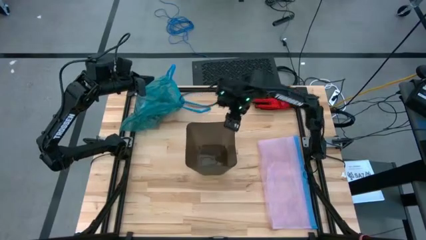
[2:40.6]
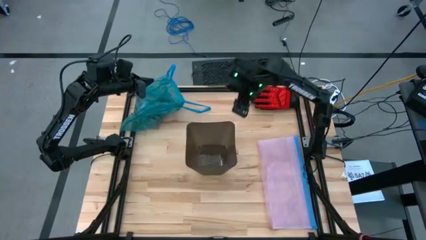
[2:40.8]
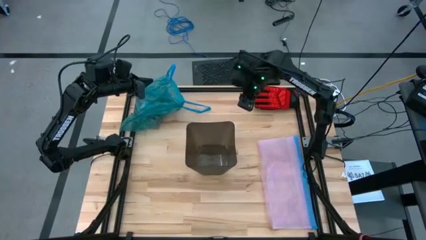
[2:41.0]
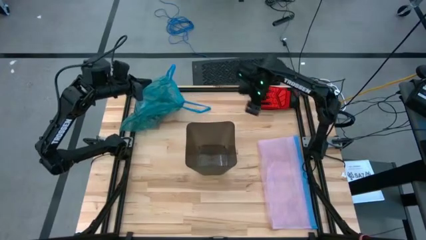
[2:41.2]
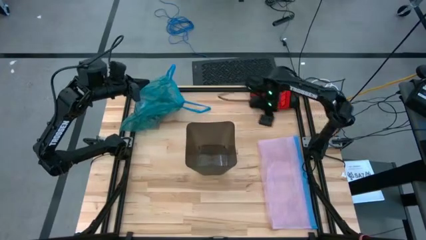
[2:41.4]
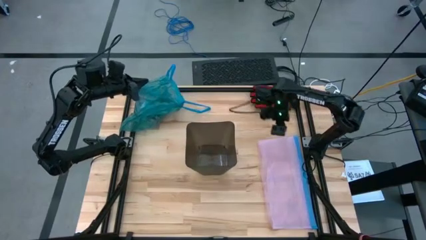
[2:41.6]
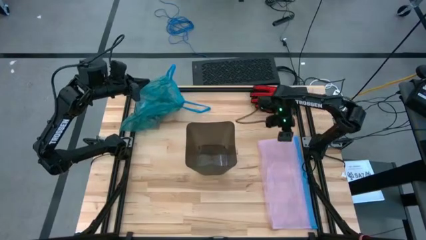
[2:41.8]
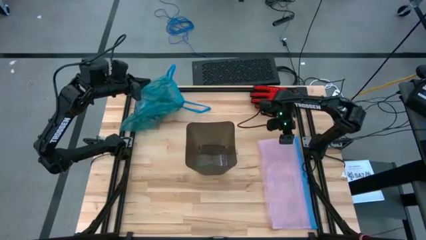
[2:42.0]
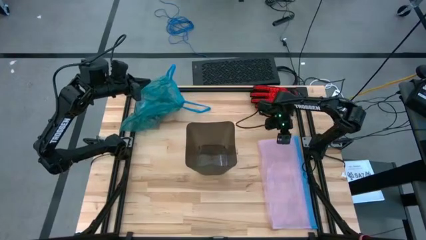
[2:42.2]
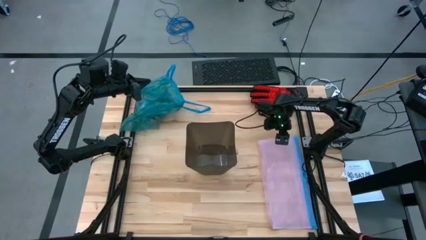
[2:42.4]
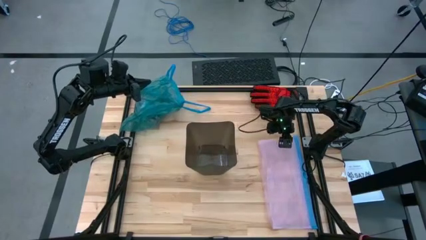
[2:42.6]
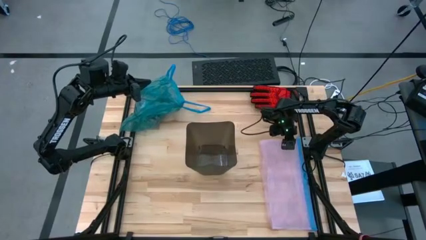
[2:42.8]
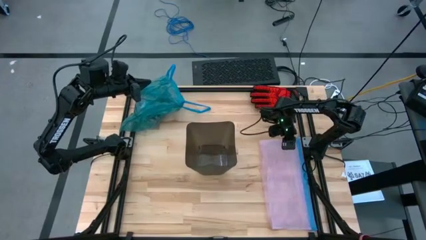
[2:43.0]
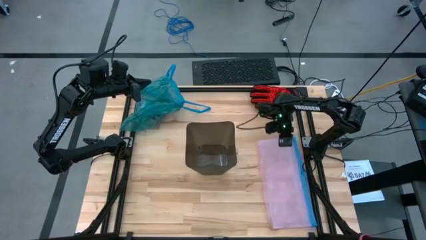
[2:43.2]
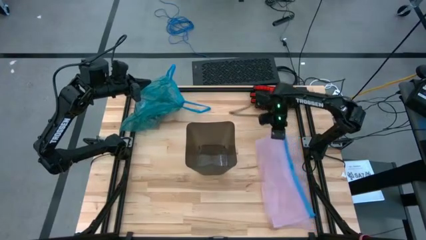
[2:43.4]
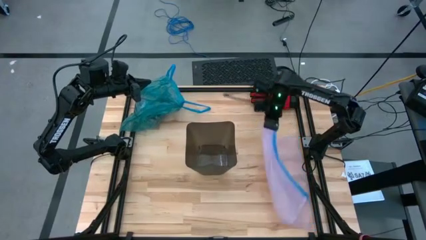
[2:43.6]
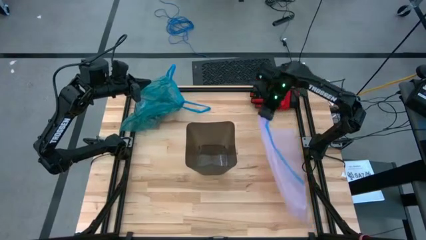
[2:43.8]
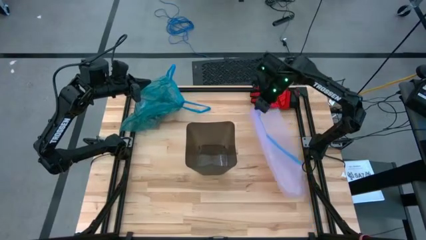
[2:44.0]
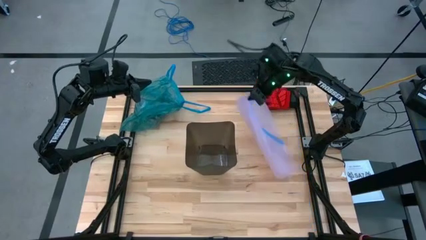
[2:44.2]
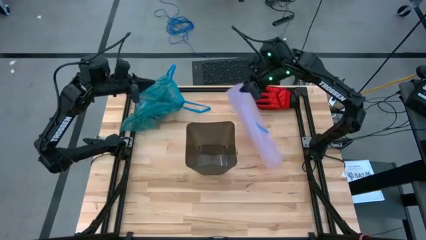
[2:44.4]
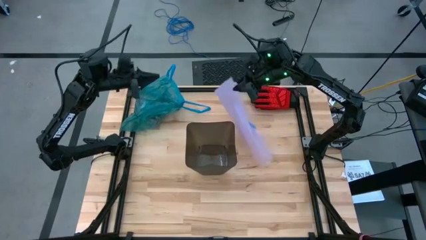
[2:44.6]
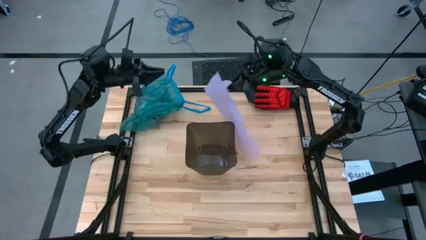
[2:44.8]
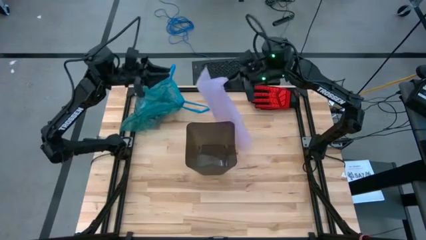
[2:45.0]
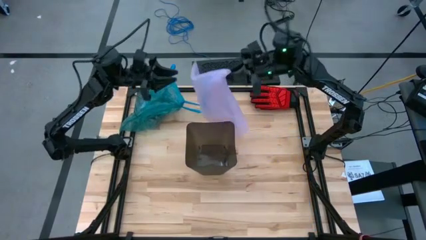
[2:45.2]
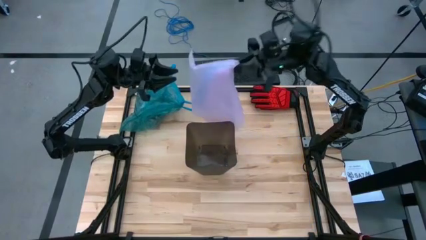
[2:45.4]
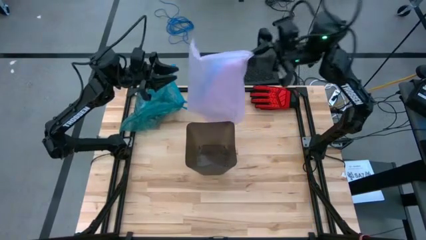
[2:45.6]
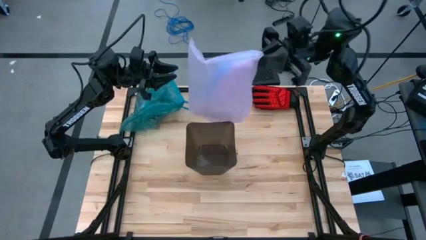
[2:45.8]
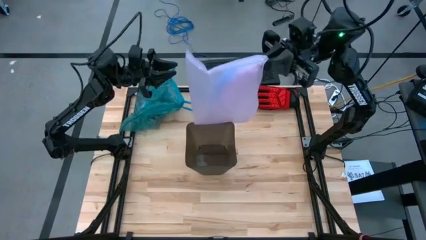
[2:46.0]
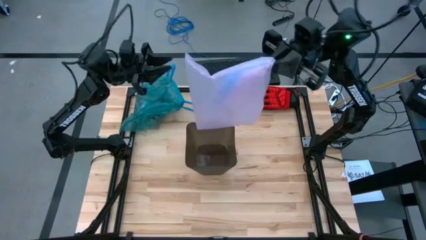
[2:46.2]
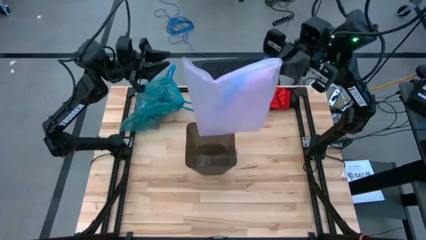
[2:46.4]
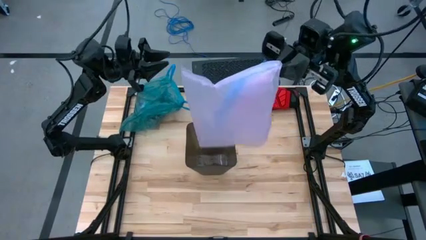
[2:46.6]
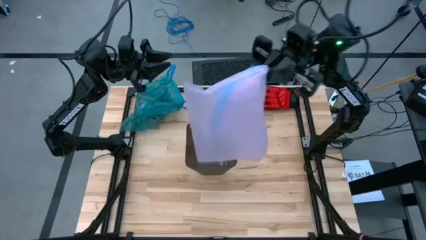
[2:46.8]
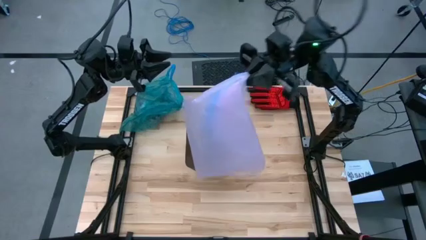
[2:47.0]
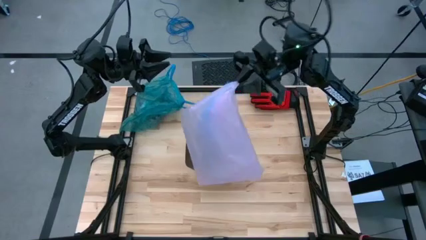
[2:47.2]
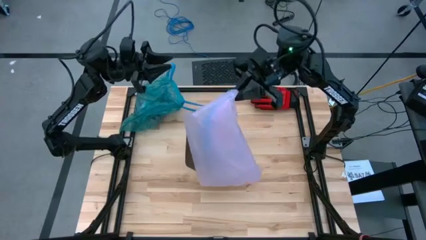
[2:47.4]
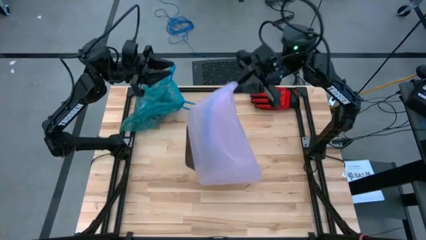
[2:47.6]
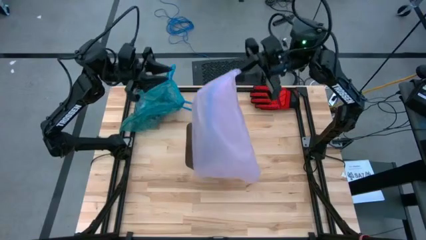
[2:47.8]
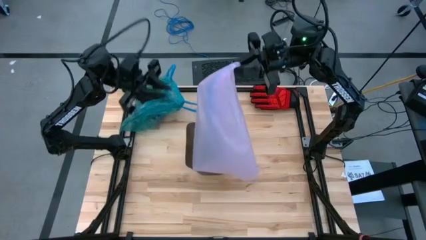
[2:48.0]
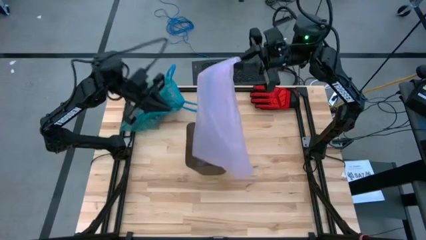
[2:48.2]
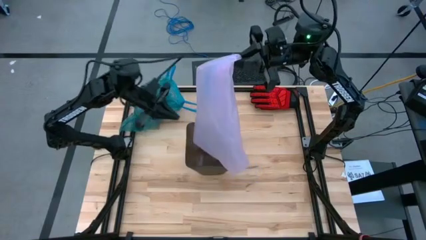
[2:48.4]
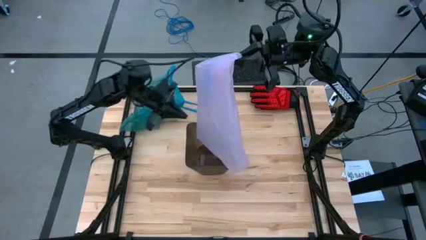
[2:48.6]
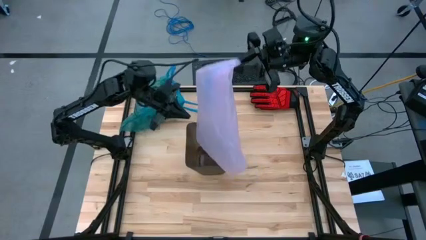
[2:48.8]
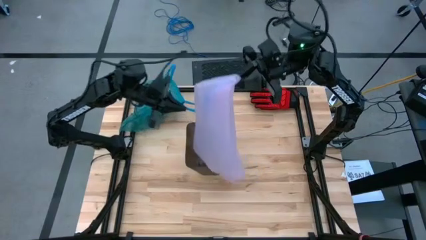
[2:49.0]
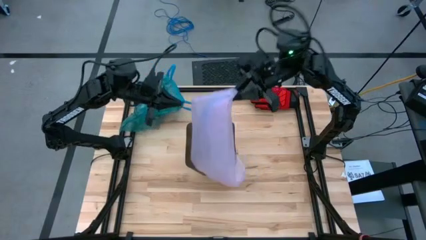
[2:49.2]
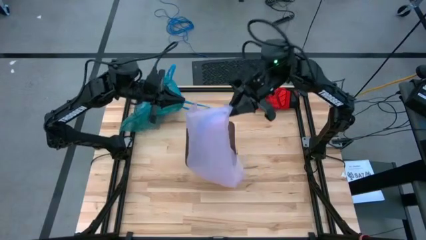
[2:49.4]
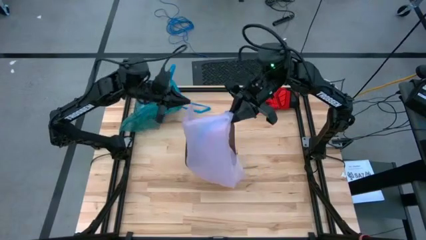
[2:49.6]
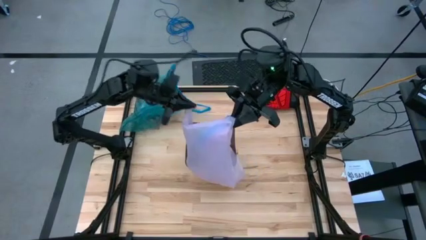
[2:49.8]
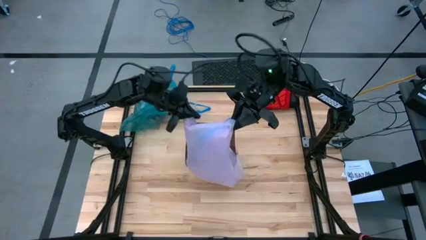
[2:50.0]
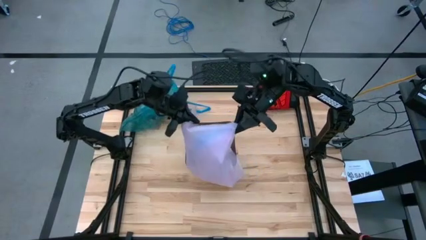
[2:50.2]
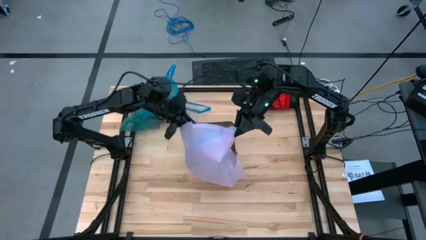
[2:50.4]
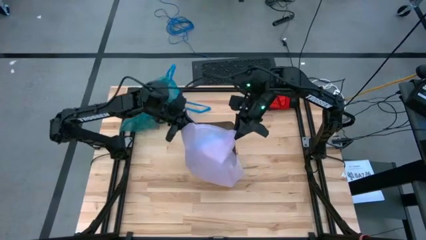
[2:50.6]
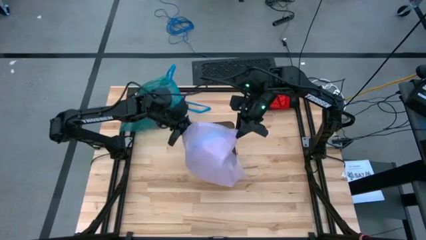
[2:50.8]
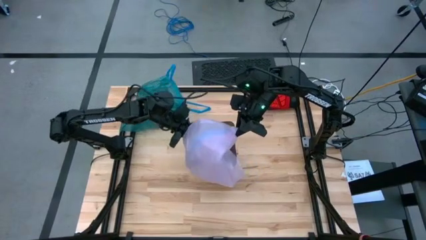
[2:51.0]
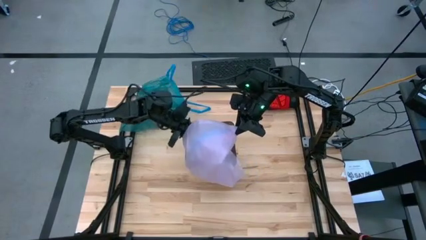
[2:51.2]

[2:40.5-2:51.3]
Task: place trash/remove bag and relplace
Insert a new pink trash bag into the black trash bin

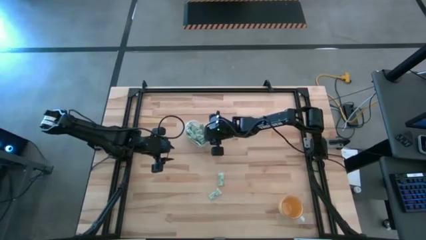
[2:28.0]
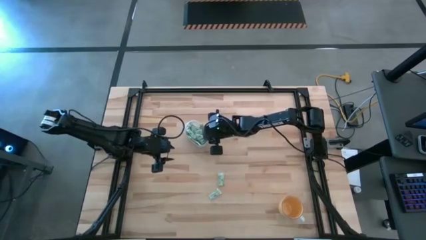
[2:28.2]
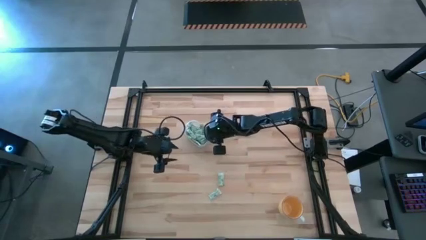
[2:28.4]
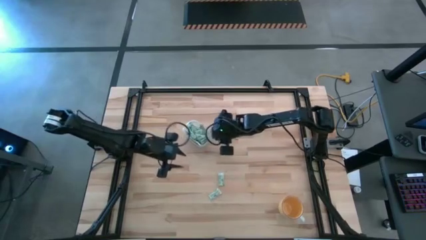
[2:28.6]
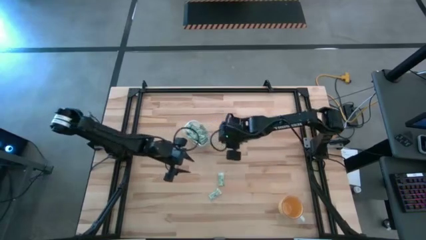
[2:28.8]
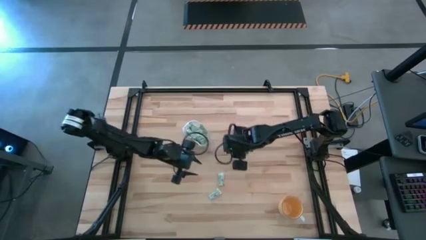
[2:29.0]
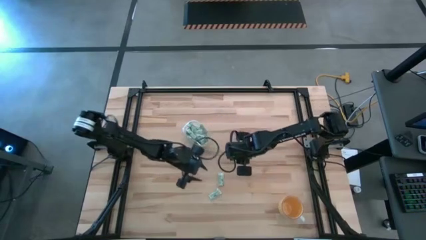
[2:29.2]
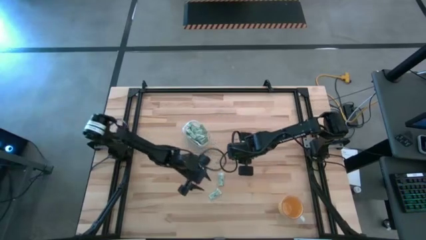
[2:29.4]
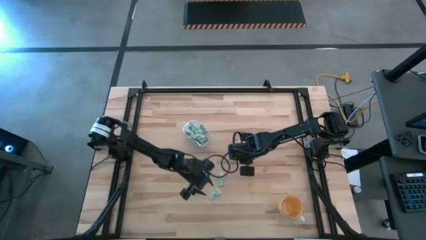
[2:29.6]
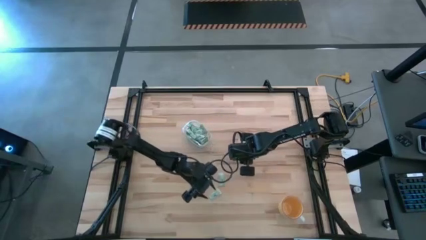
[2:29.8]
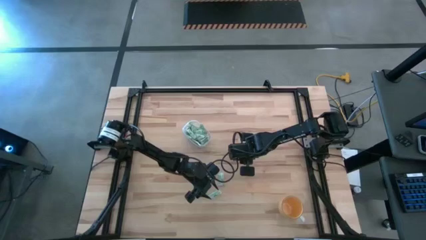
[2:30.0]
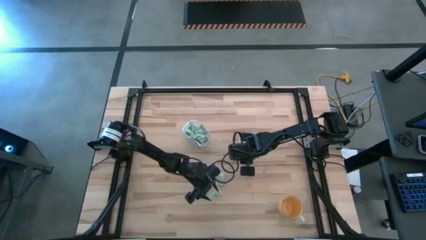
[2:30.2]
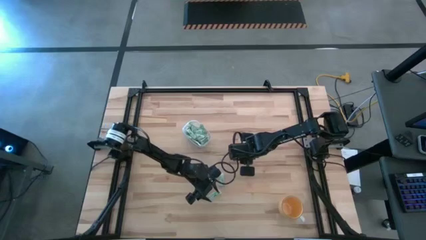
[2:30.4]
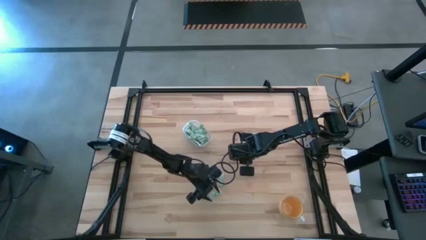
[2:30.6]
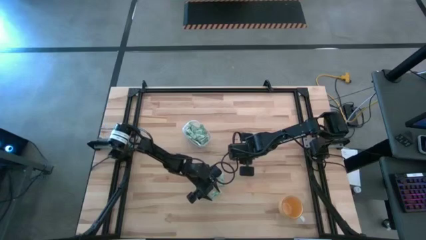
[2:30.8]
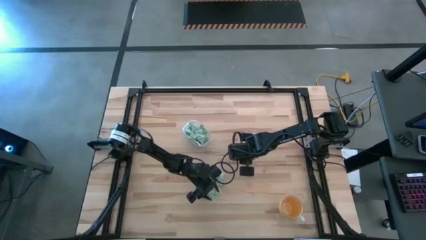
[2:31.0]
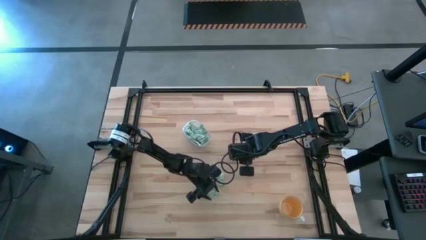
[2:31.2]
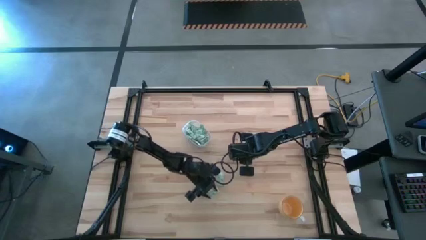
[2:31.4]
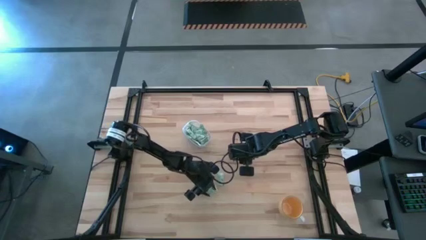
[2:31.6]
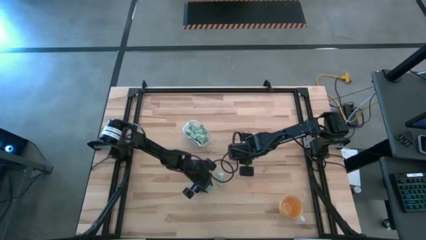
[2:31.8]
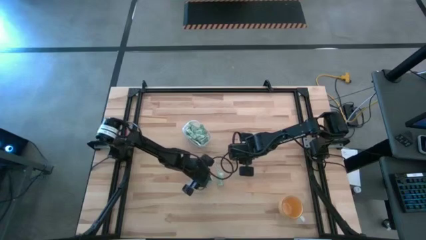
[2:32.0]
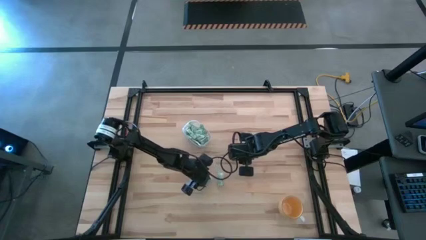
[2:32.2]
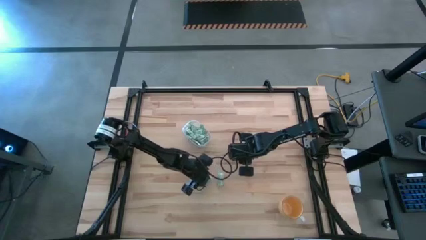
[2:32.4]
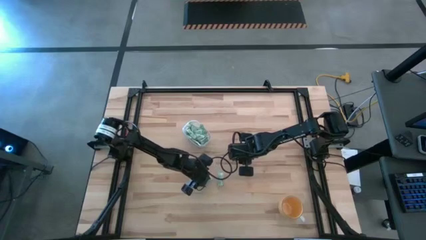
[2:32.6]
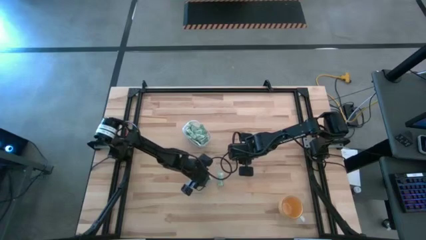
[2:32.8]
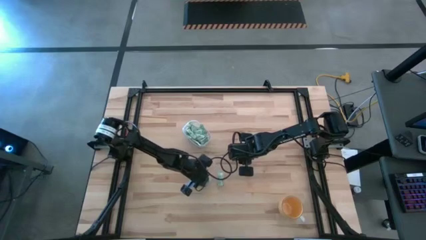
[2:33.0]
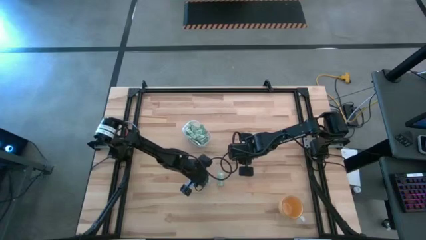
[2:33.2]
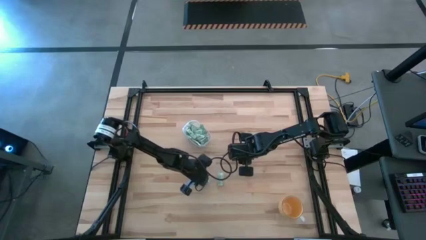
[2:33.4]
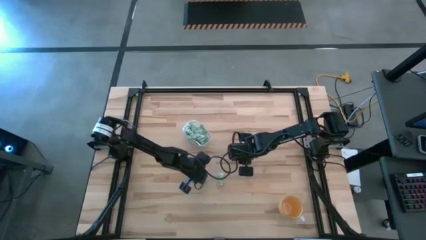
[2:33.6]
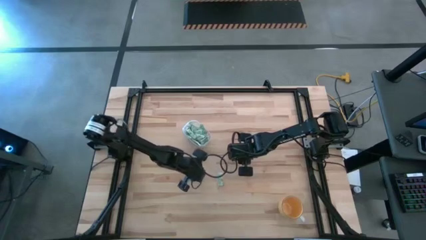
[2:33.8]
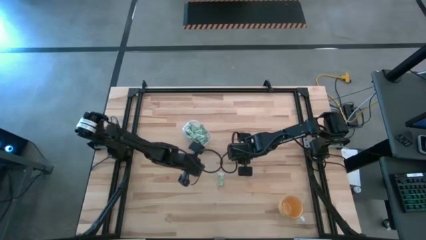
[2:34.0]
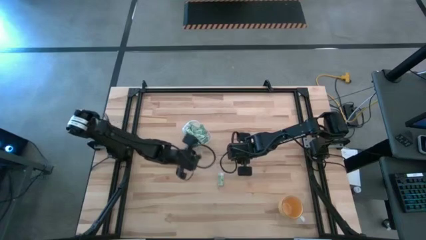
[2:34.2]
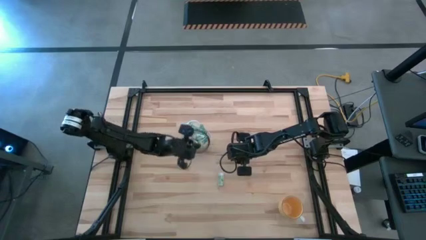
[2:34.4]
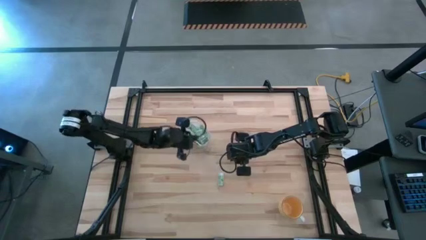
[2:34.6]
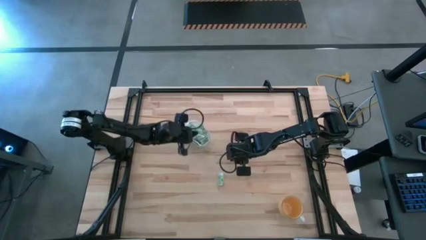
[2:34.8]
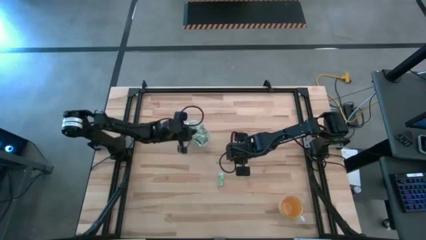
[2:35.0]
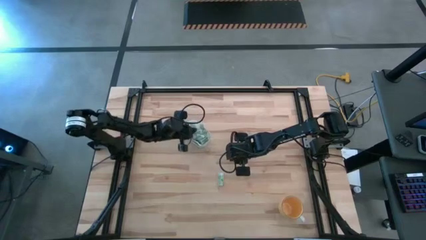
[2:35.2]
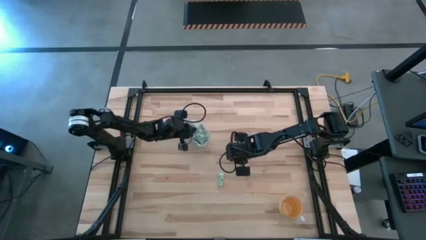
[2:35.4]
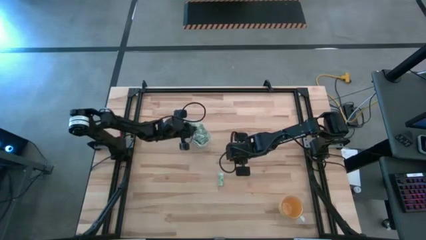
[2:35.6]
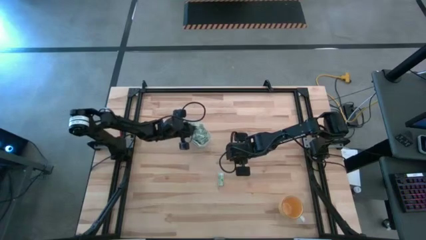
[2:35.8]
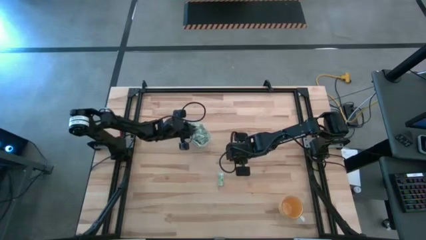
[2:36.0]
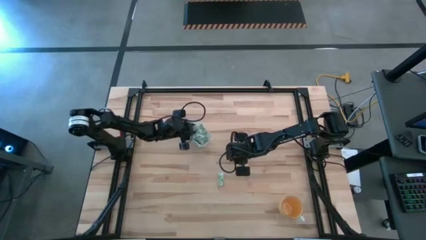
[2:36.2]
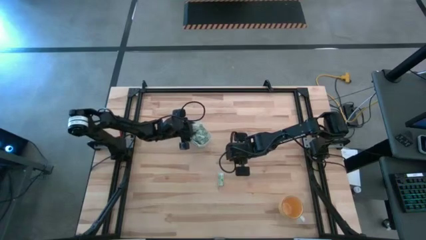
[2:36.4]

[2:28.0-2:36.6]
Task: Pick and place Stevia / Truvia into bins
Put the stevia packet into the transparent bin
